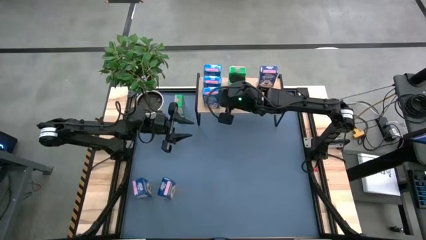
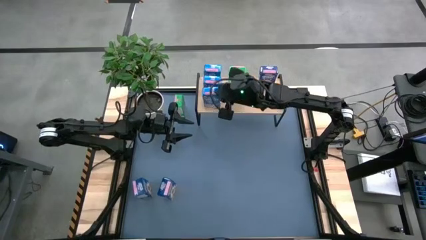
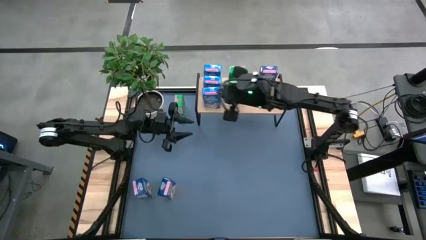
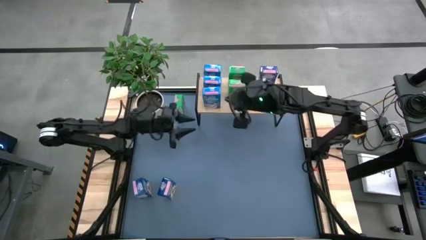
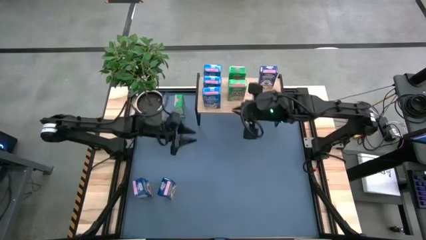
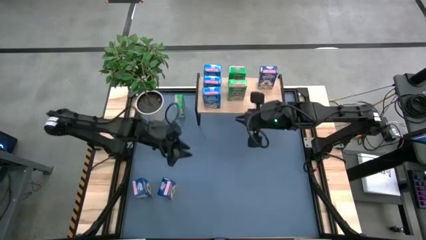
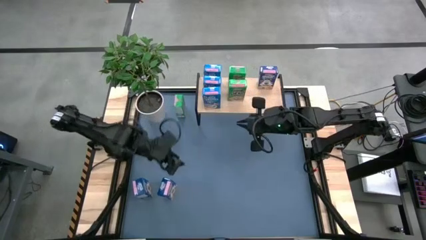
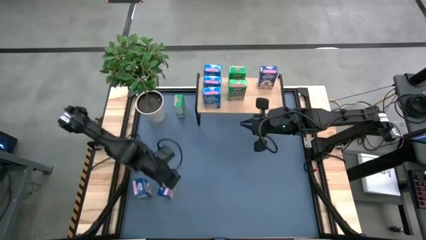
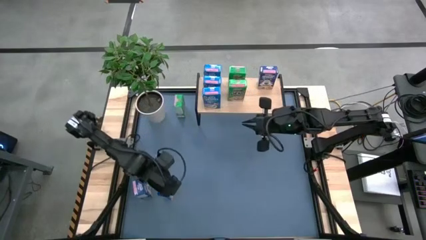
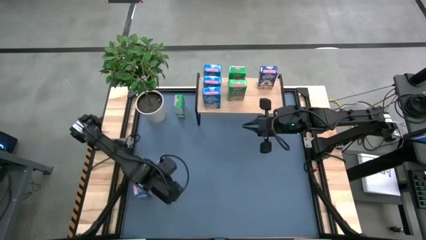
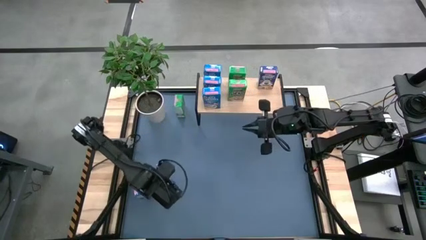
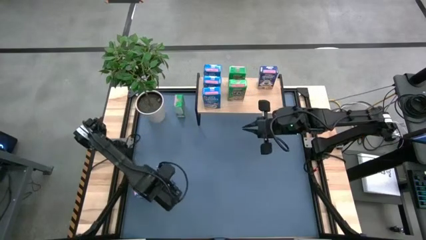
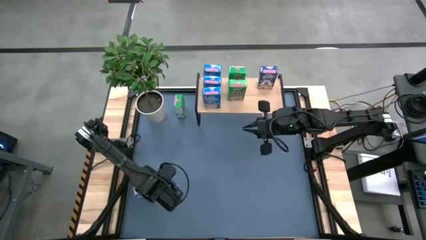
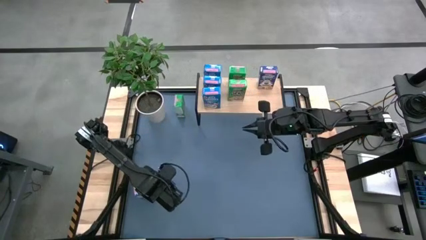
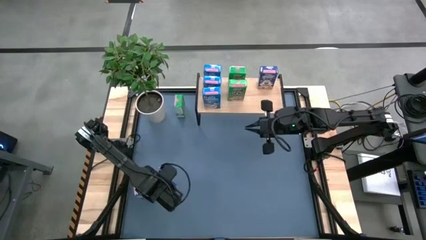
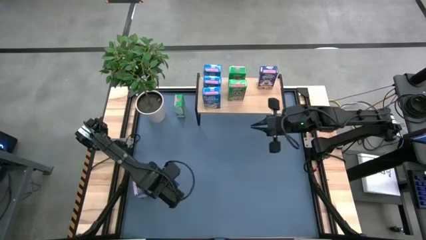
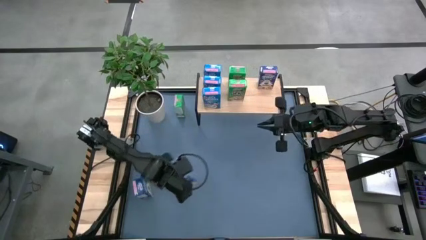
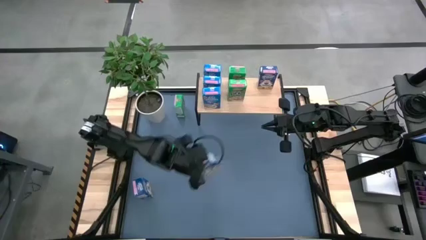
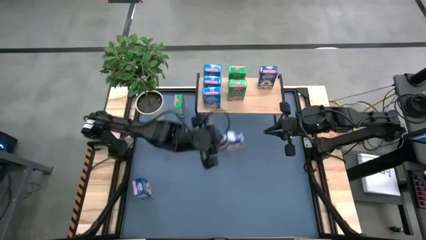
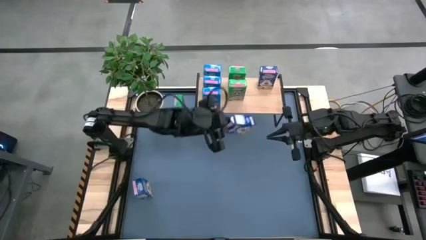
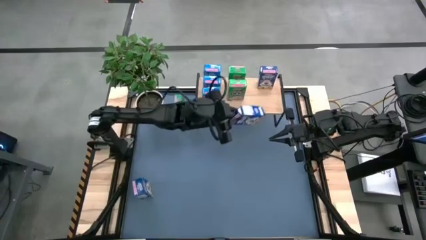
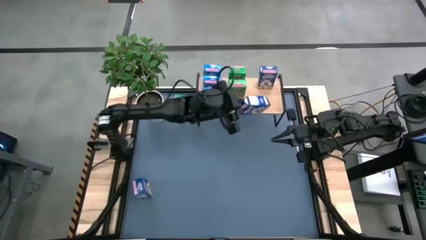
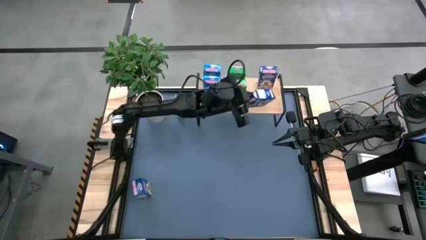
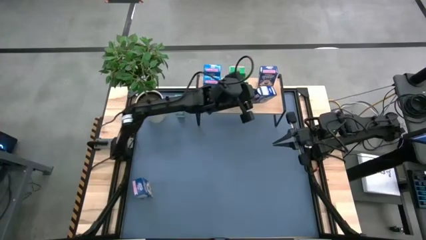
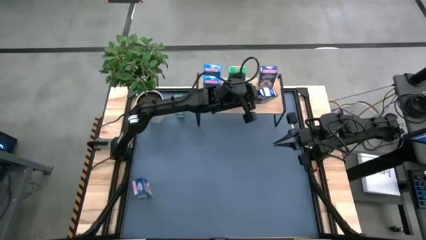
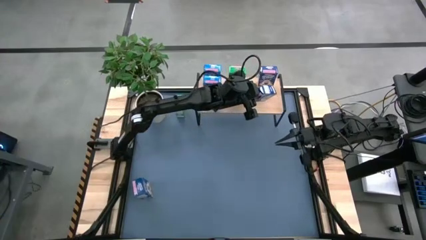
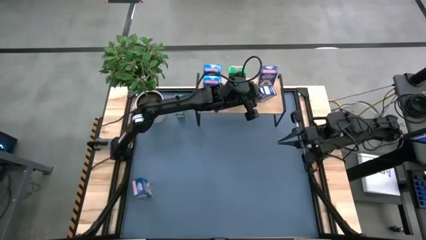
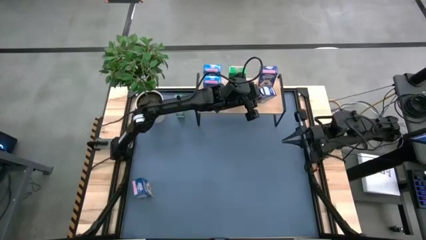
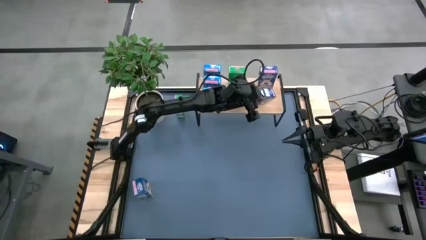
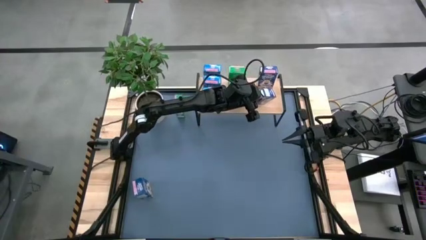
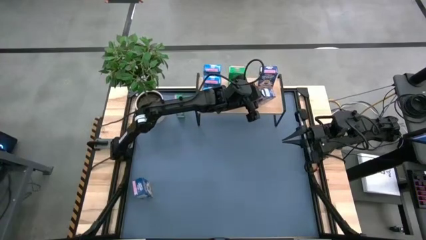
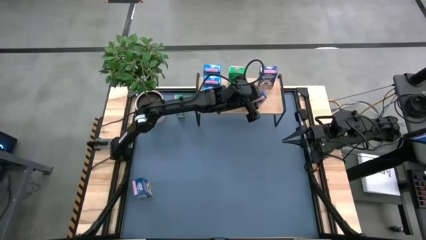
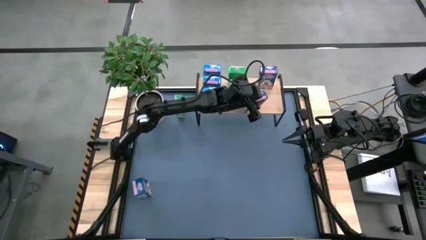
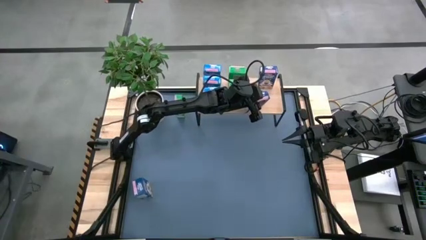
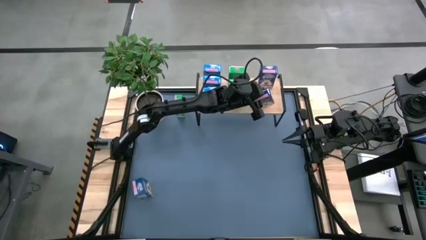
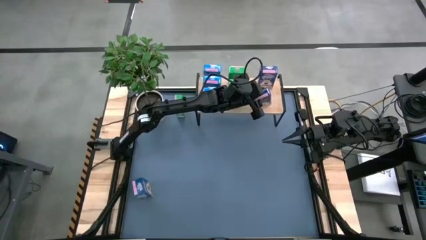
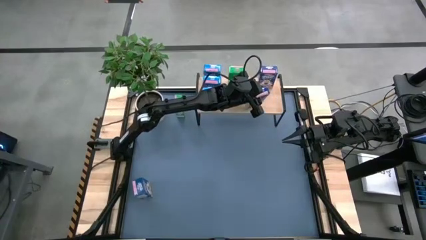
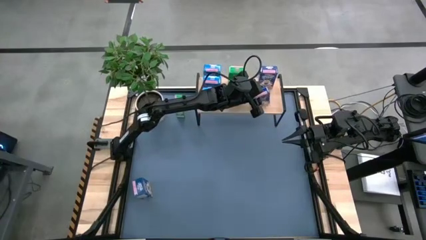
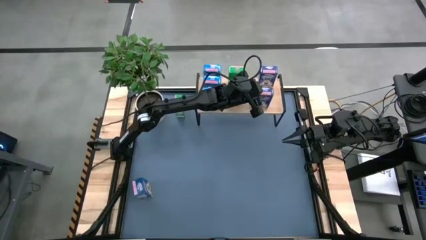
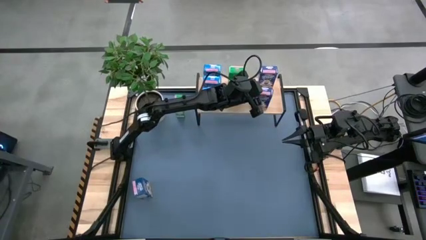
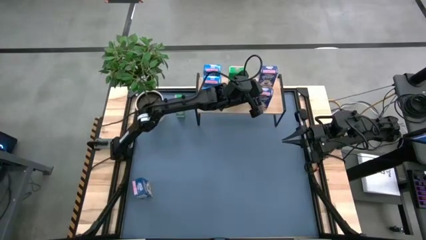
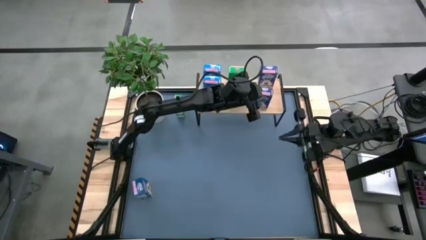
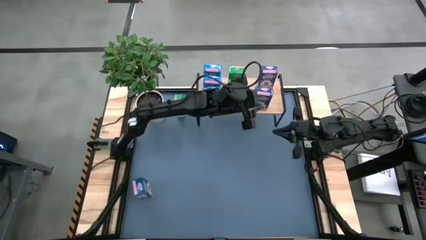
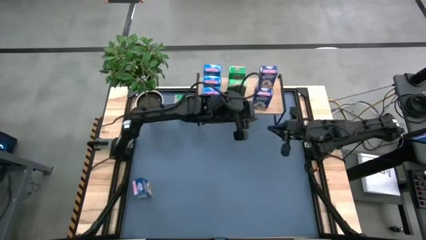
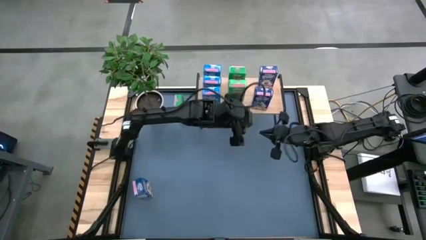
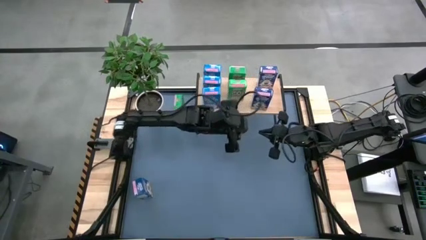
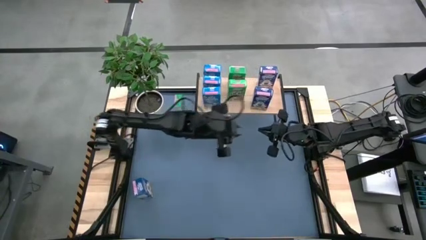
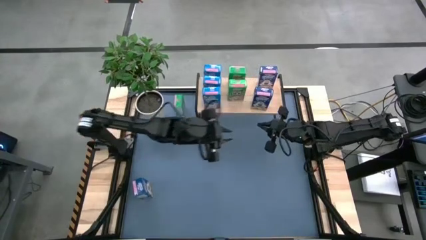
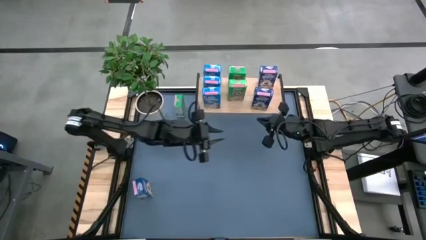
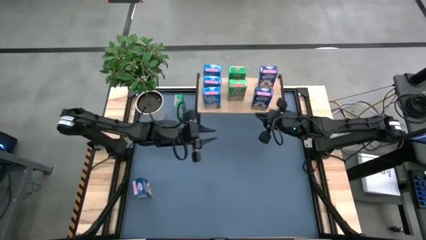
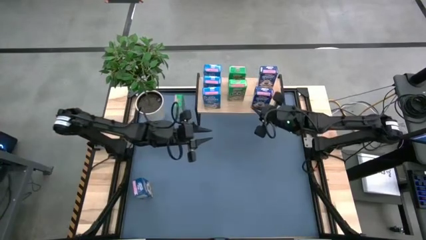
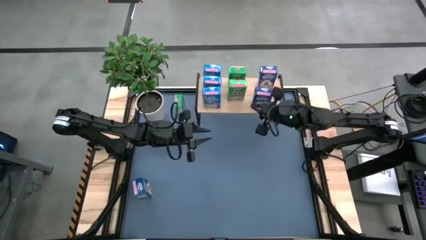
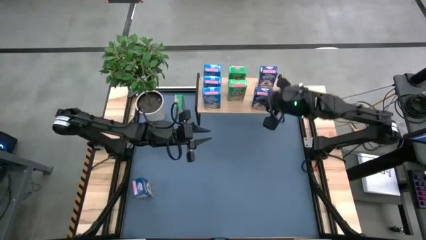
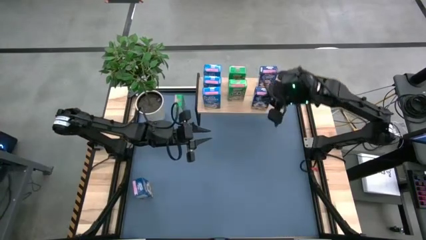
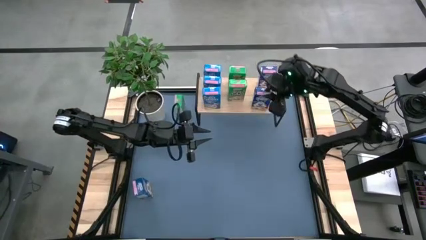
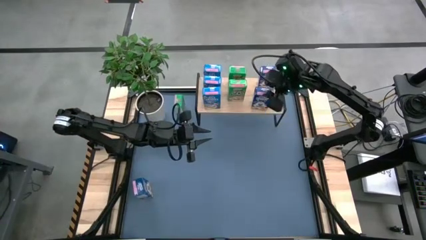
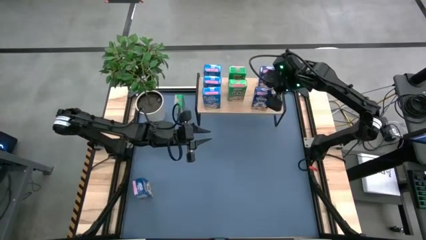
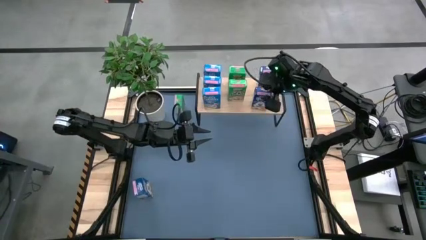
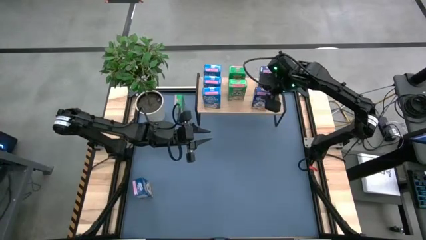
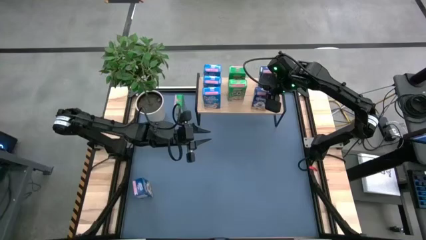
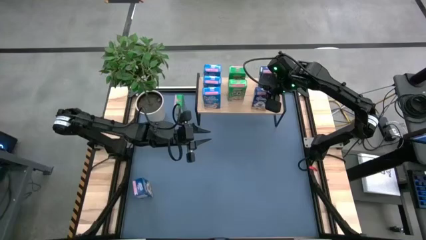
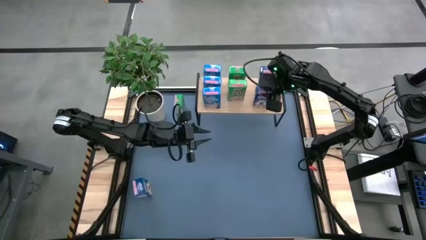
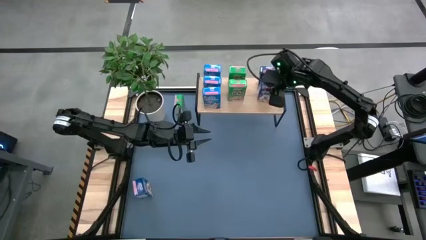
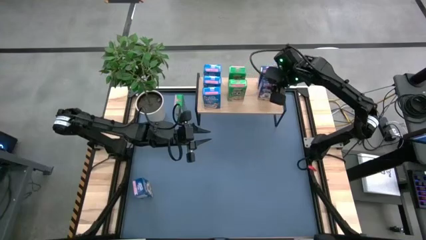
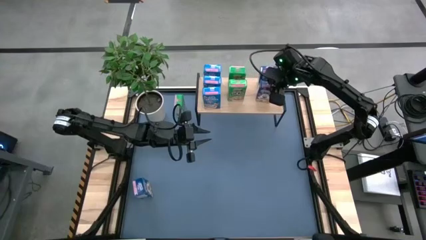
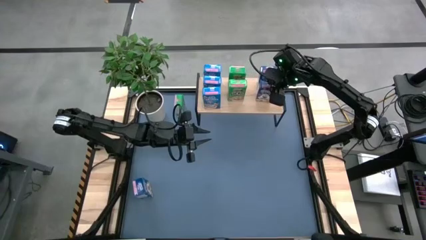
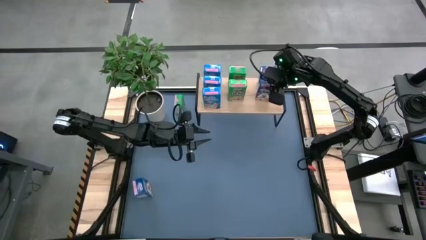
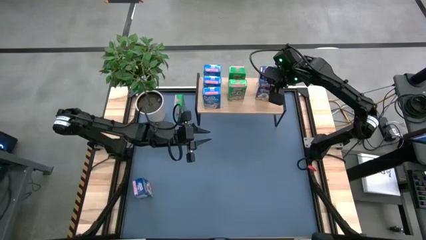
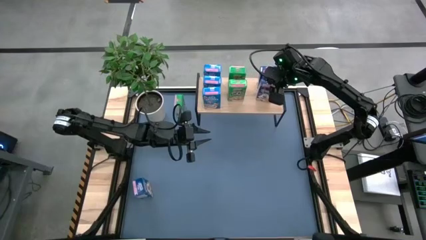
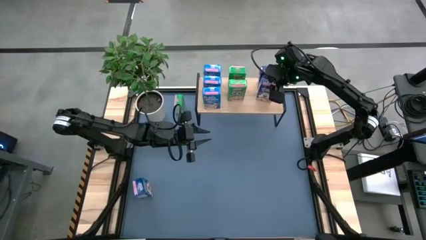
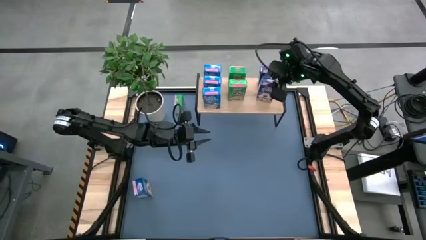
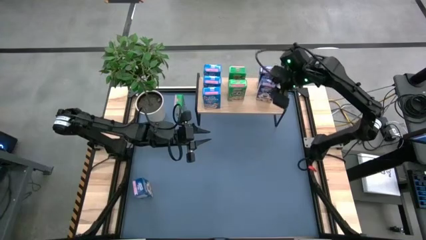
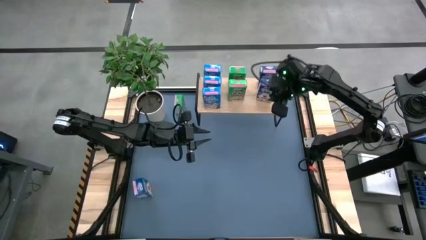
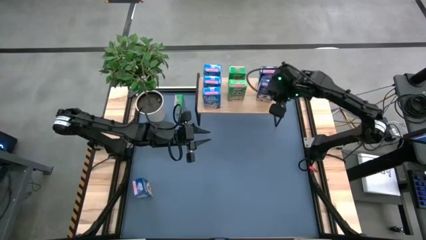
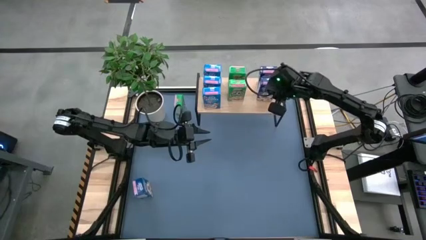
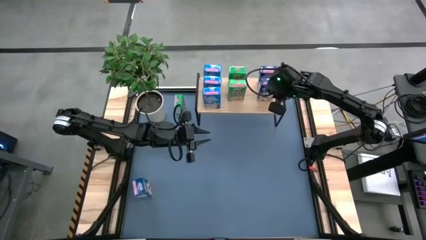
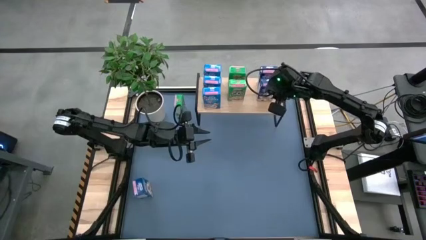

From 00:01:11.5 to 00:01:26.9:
Task: Stack cereal on shelf
Put the right blue cereal box on the shelf aligned with the other blue cereal box
